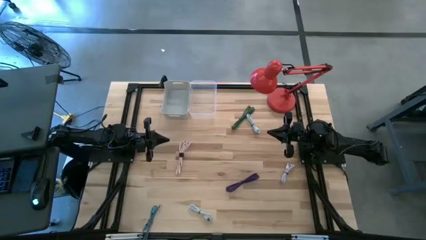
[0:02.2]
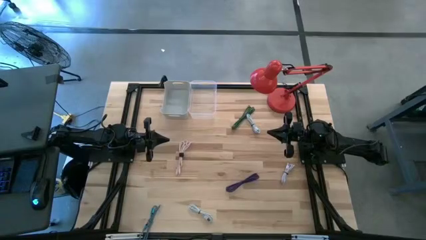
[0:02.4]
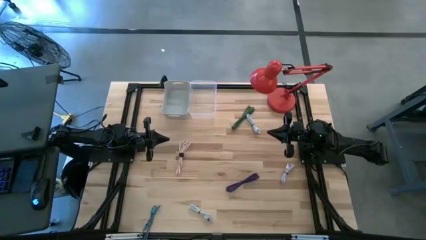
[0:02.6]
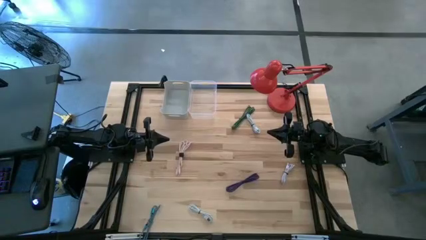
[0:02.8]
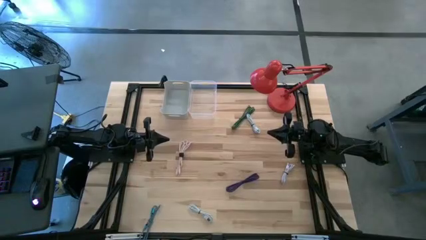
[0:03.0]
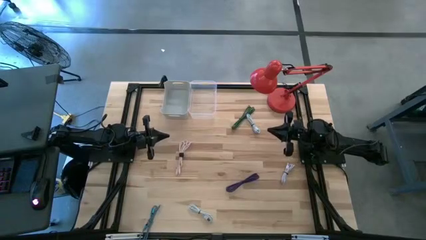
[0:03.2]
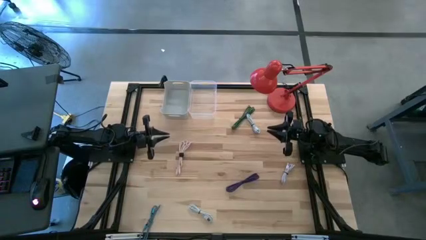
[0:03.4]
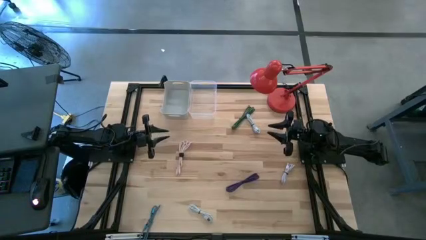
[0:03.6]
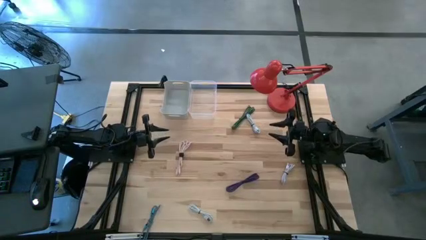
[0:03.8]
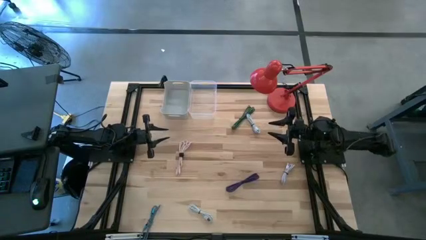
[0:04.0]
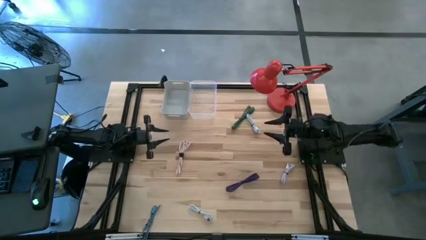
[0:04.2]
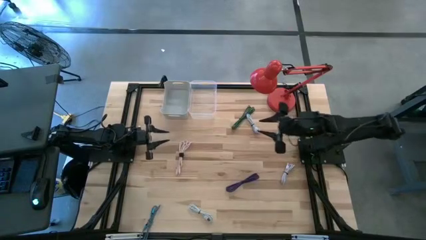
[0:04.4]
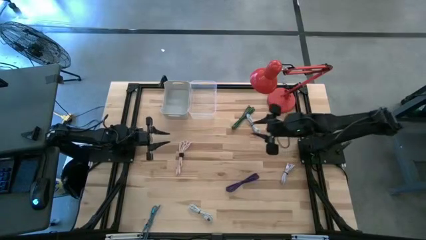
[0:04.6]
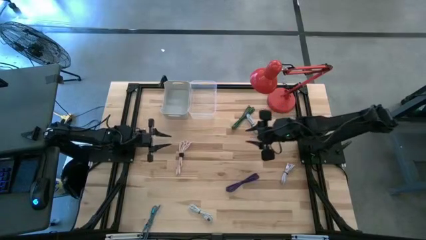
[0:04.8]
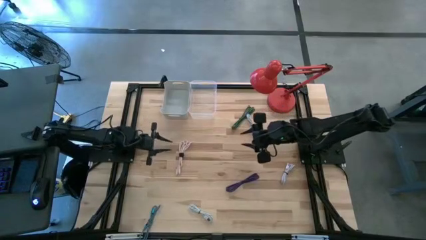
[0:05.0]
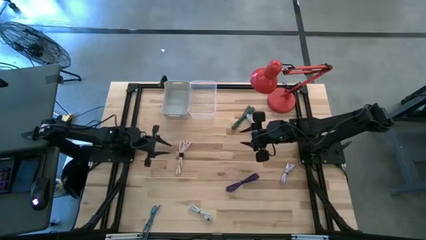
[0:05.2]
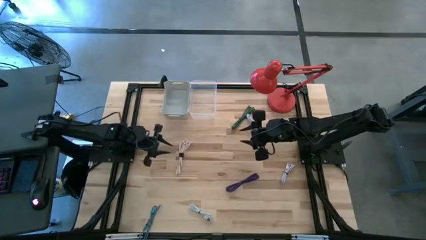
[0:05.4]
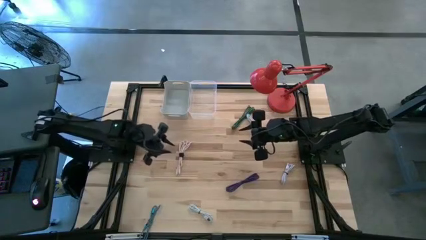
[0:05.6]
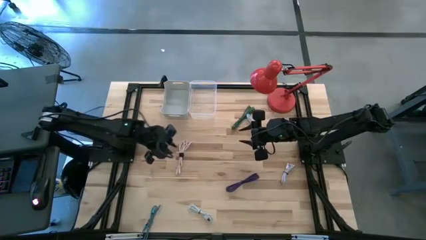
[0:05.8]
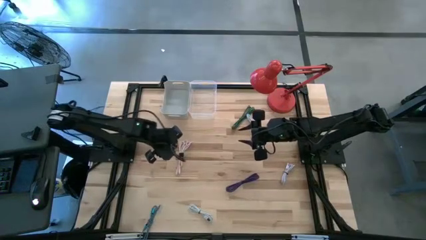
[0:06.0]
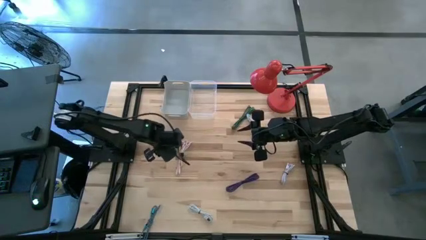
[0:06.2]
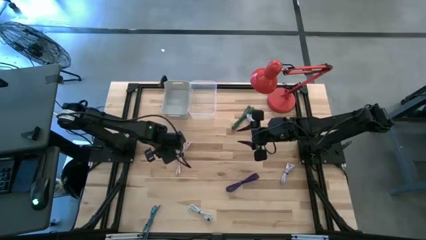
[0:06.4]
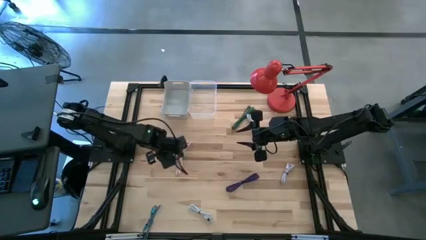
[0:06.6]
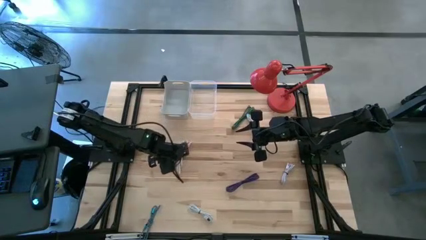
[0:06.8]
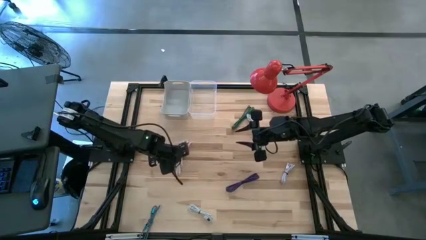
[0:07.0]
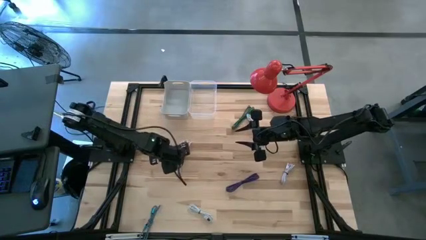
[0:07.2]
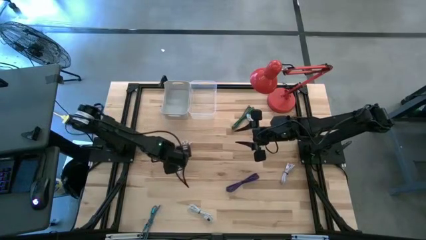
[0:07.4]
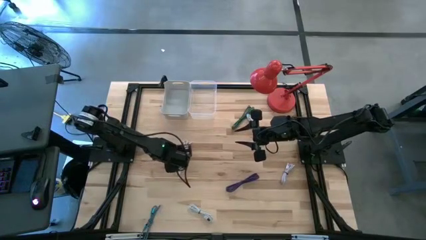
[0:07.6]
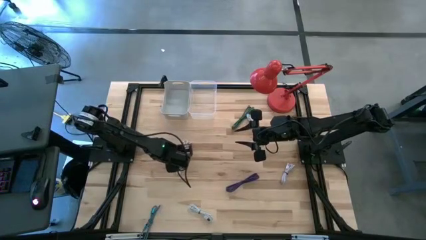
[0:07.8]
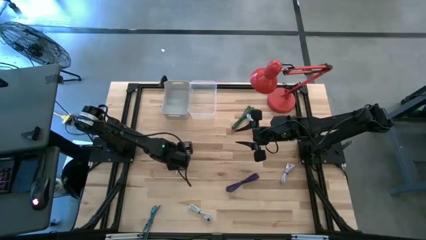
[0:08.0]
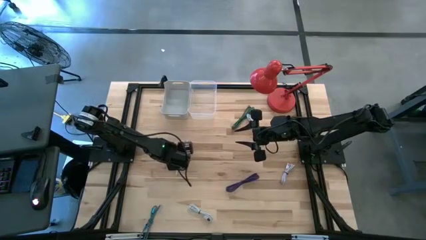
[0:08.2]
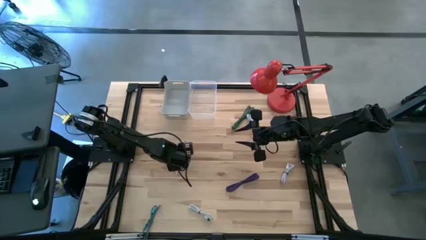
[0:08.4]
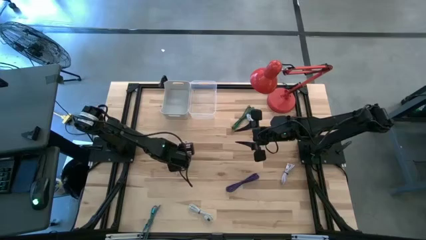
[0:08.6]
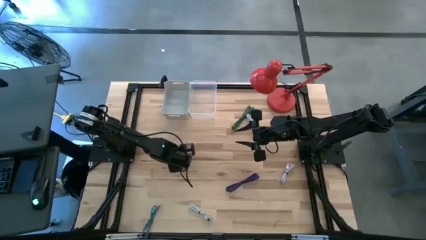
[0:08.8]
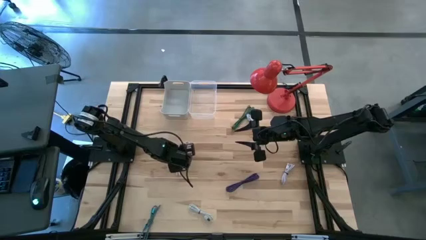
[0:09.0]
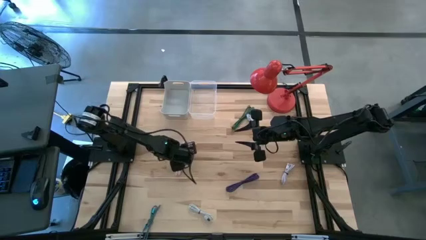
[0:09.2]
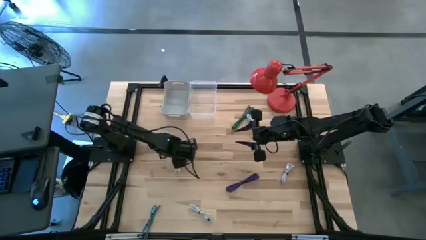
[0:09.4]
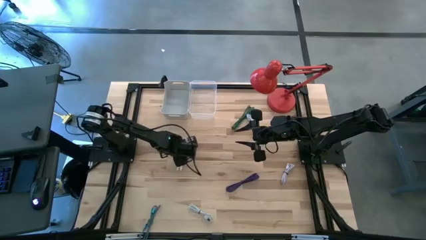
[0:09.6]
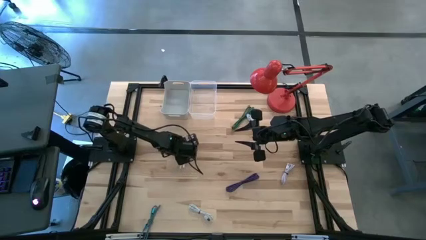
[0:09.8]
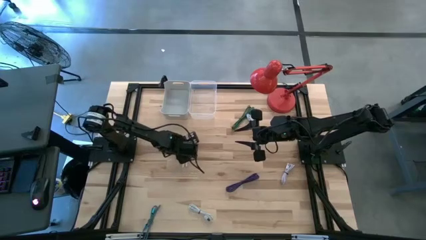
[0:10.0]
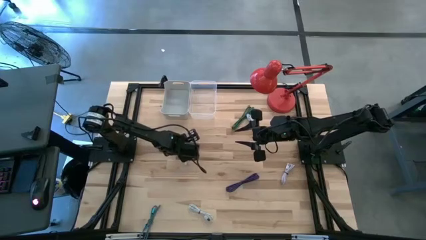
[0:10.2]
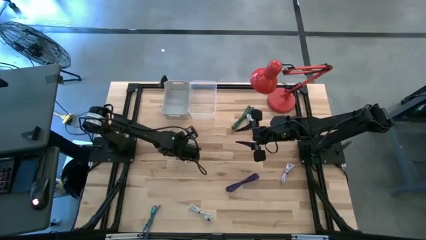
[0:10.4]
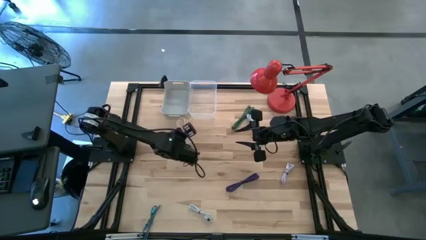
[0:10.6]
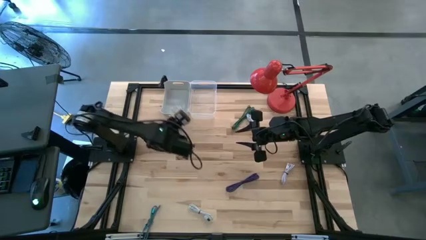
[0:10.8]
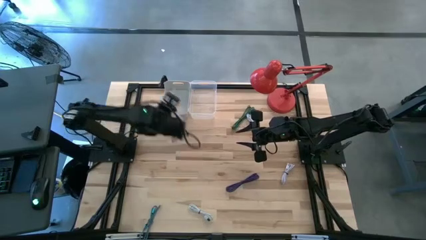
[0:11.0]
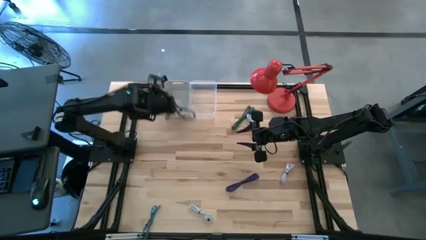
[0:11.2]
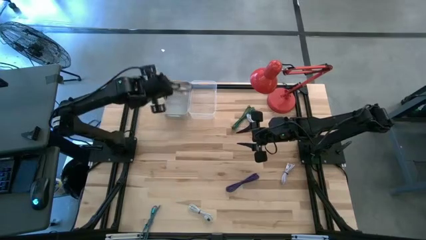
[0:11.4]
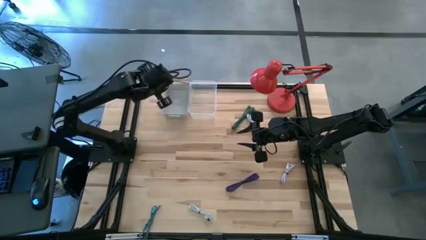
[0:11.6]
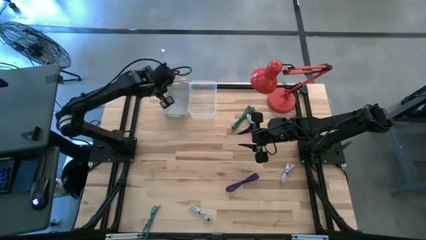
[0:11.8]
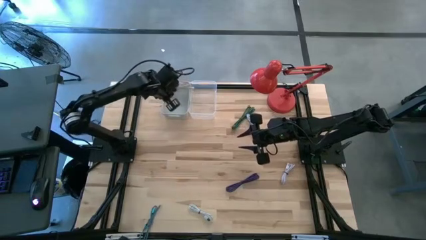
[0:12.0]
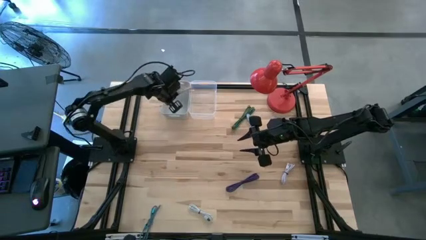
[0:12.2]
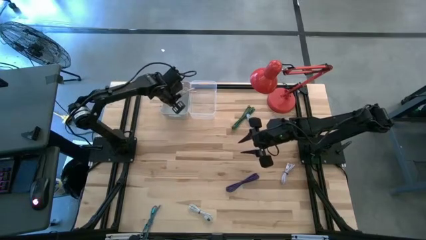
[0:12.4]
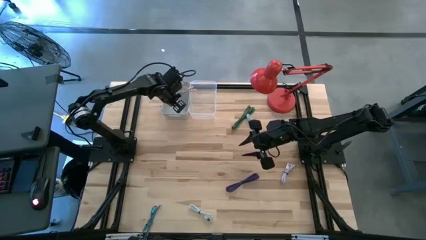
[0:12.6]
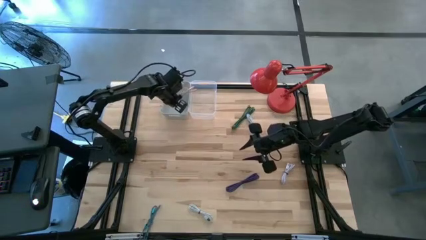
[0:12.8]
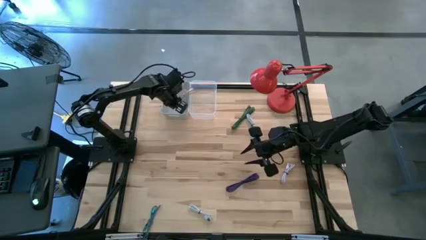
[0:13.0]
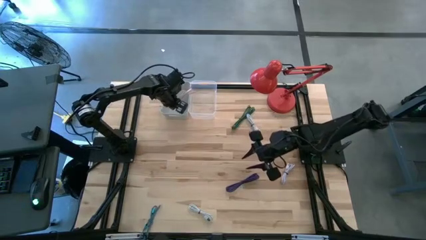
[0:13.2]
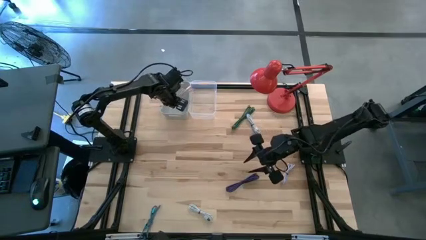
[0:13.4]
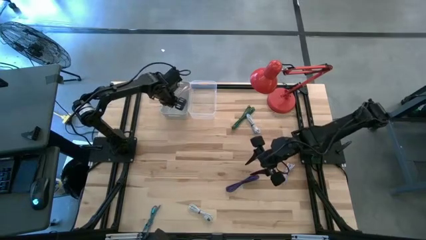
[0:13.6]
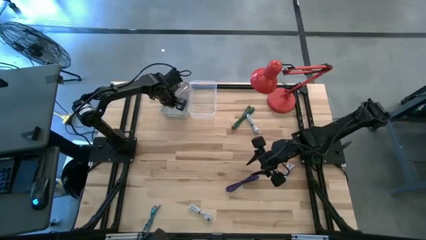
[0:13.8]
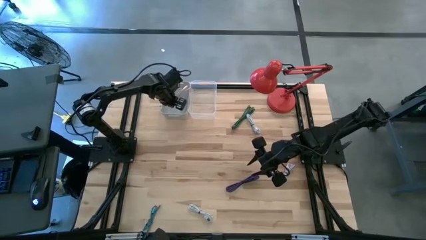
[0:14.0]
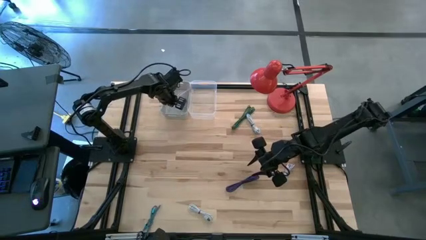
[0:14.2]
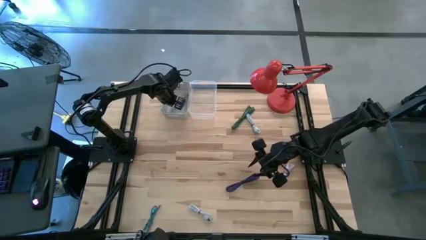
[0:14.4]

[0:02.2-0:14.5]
Task: Pick & Place USB Port
Put the light pink patterned charger cable into the gray bin

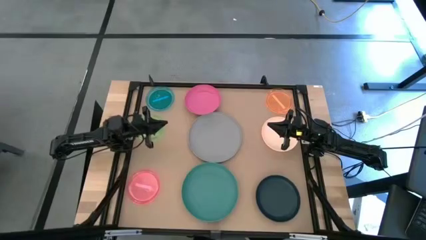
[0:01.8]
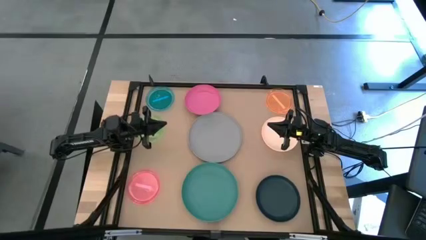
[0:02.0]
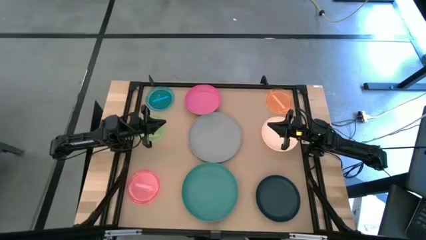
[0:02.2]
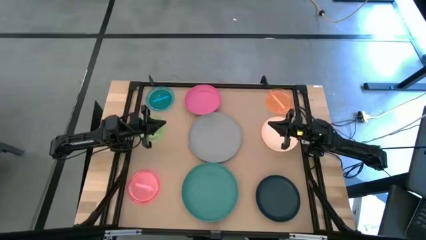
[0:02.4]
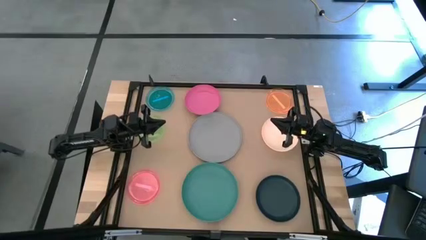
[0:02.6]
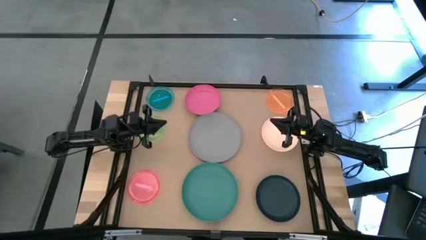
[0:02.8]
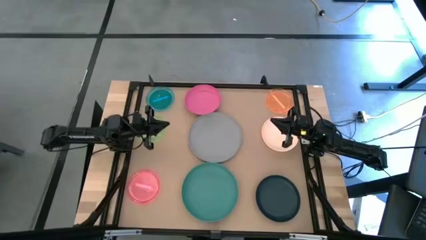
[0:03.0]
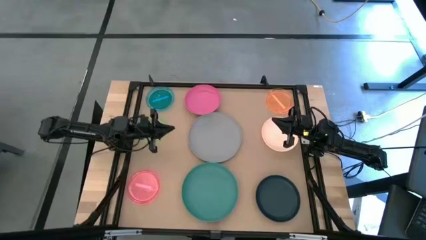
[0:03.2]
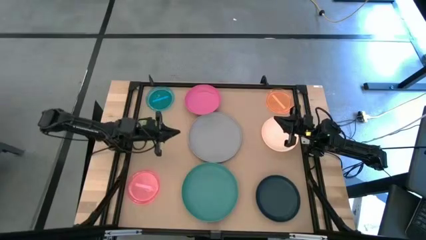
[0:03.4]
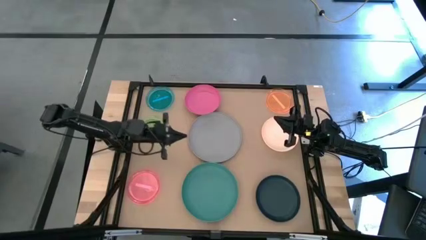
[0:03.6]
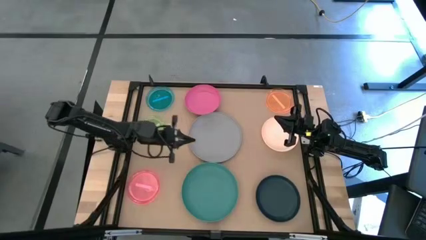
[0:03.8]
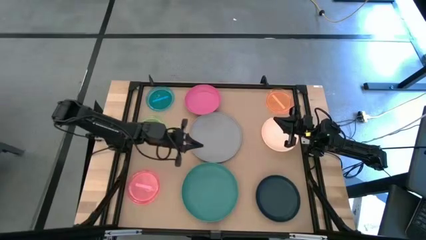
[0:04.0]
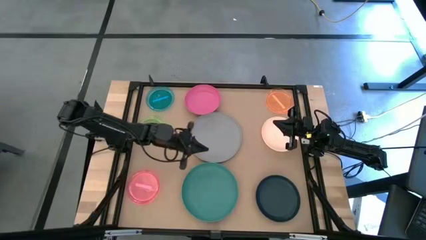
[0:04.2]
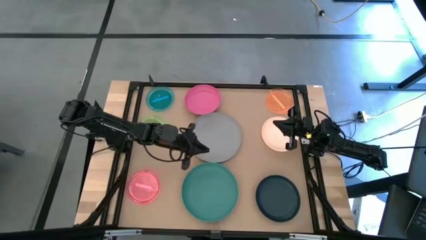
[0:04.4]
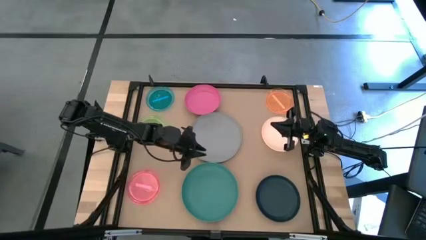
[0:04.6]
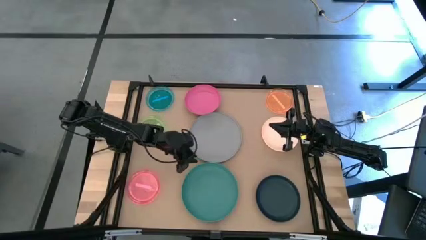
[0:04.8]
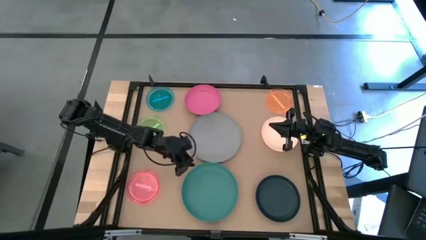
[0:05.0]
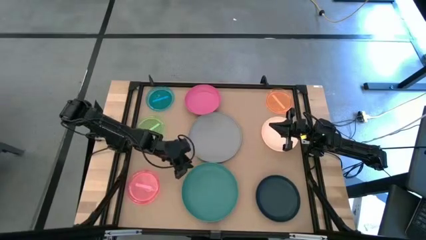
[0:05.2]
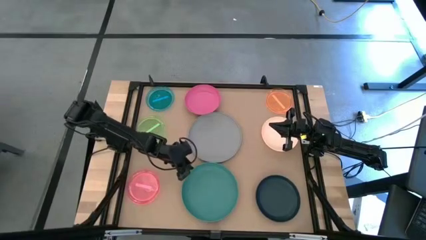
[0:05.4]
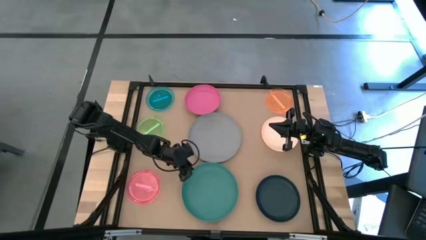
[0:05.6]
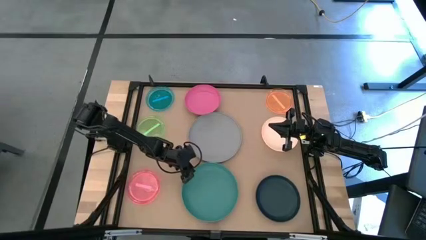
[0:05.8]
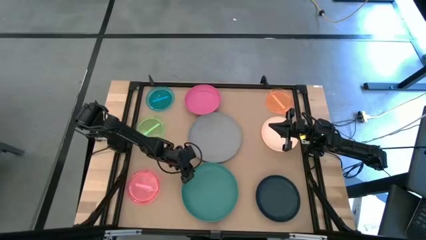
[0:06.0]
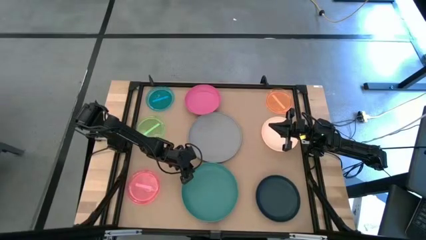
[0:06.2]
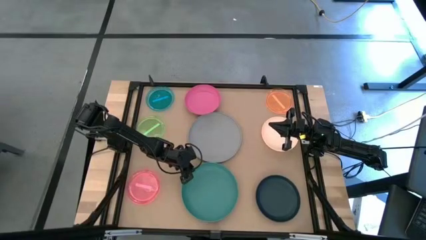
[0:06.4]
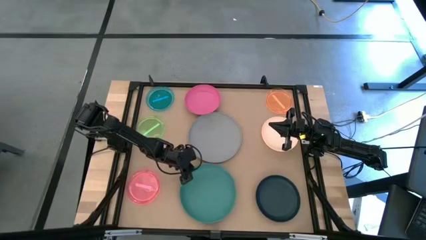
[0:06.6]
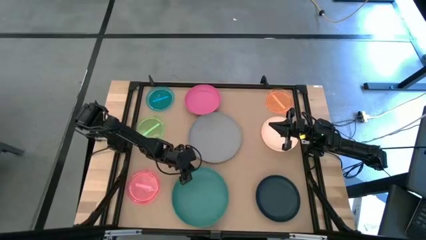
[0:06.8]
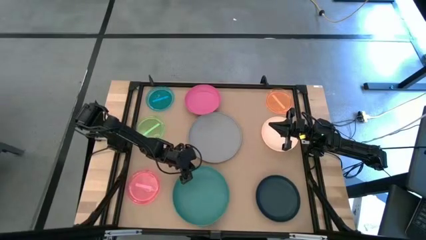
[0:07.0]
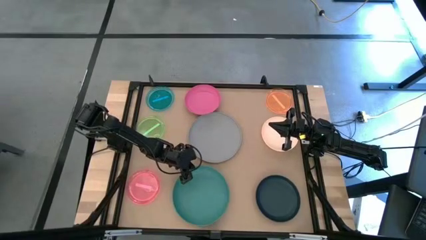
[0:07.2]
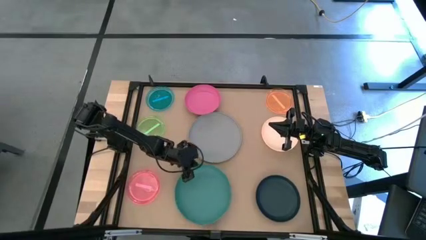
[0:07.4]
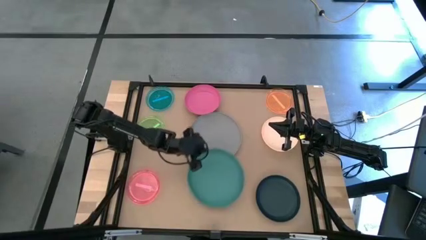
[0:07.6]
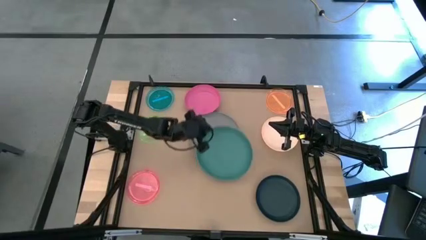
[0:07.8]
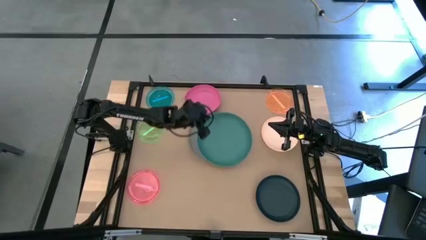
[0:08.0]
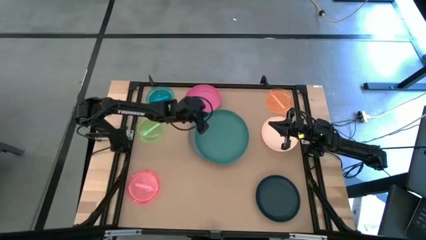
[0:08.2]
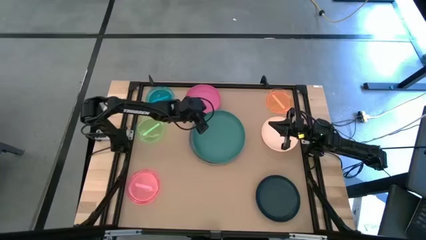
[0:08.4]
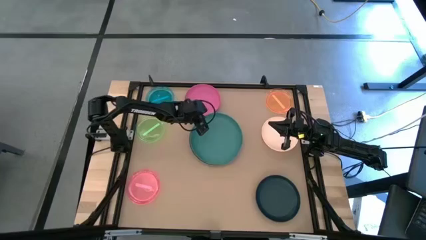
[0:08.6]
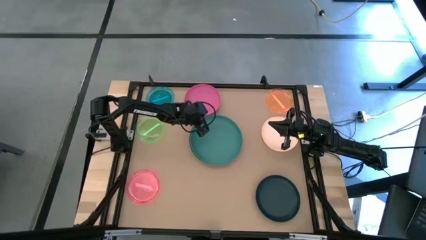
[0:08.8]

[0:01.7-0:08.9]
Task: Stack plastic plates
Stack the green plate on the gray plate
